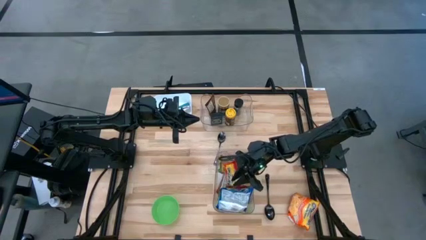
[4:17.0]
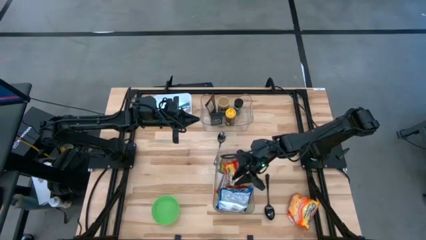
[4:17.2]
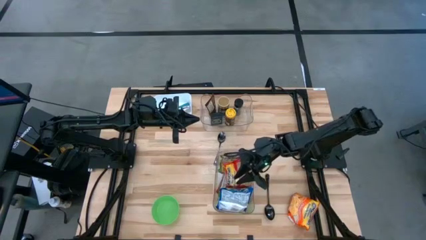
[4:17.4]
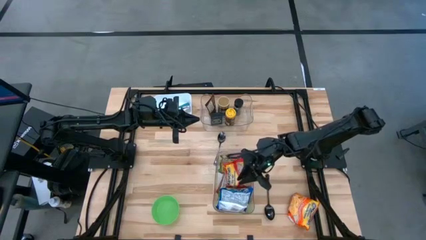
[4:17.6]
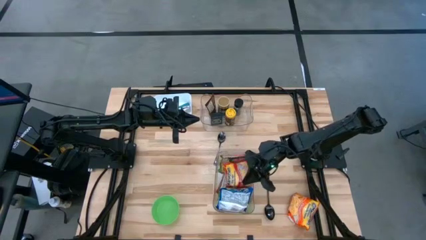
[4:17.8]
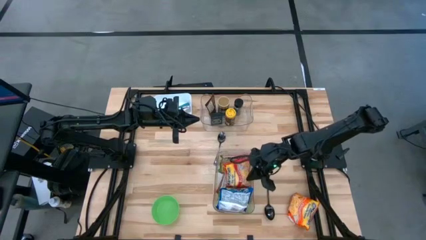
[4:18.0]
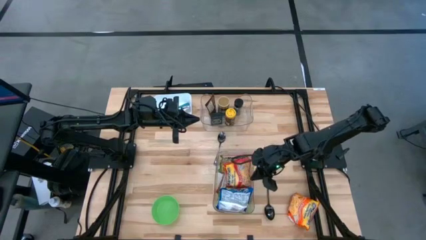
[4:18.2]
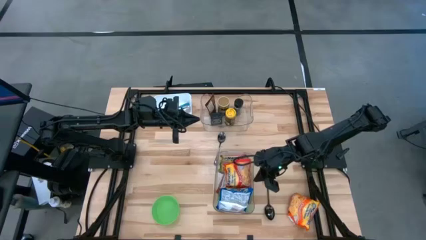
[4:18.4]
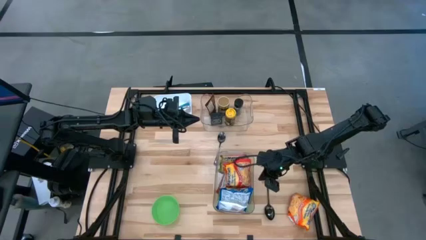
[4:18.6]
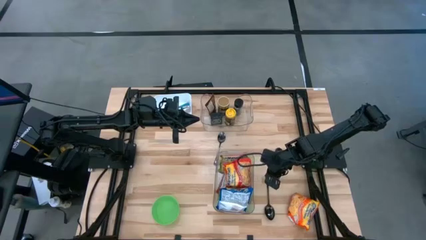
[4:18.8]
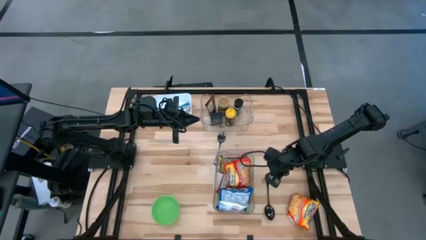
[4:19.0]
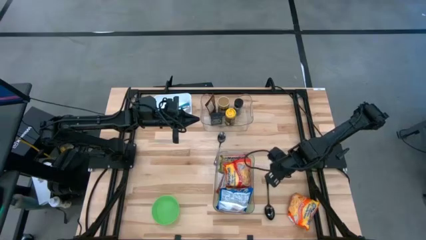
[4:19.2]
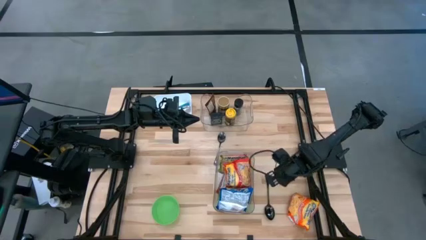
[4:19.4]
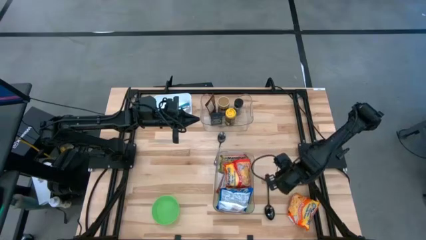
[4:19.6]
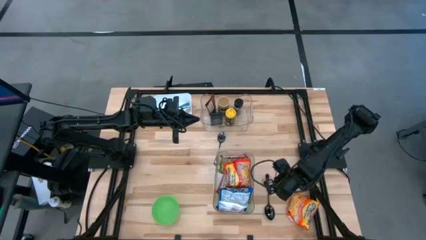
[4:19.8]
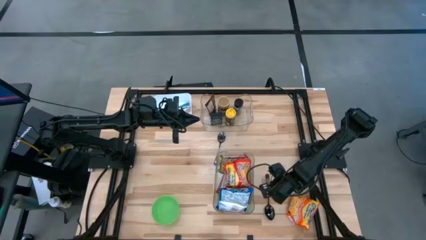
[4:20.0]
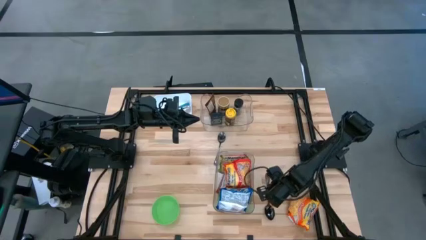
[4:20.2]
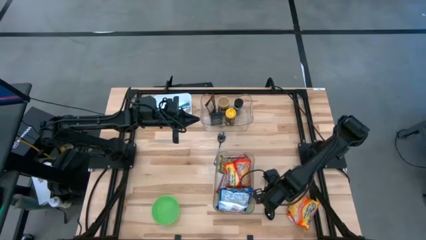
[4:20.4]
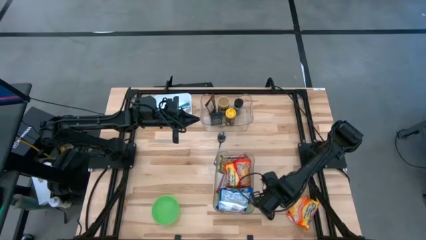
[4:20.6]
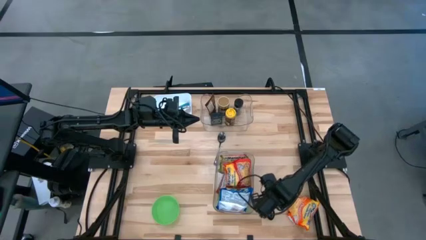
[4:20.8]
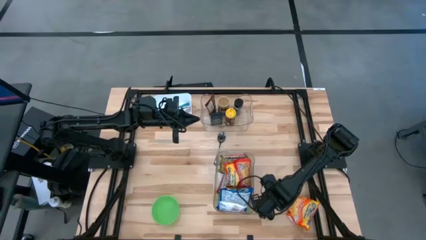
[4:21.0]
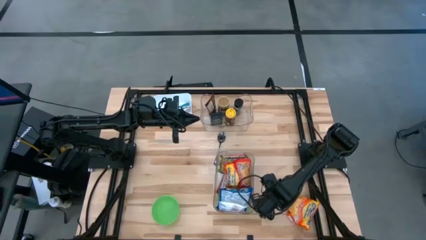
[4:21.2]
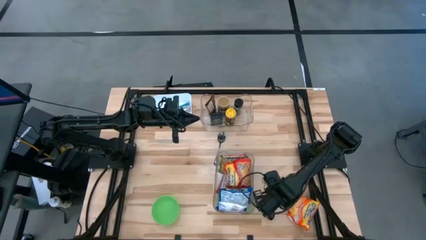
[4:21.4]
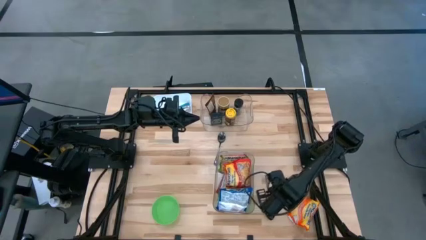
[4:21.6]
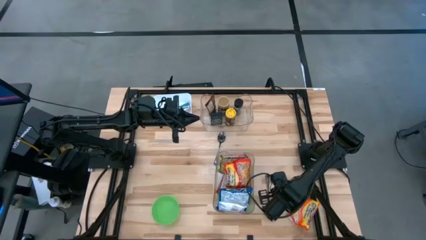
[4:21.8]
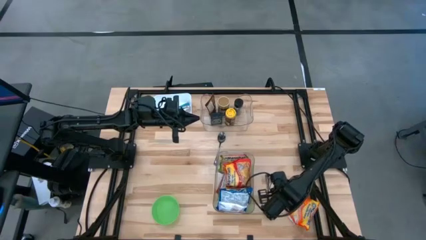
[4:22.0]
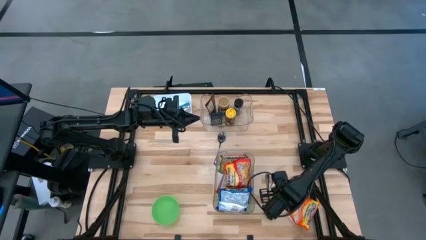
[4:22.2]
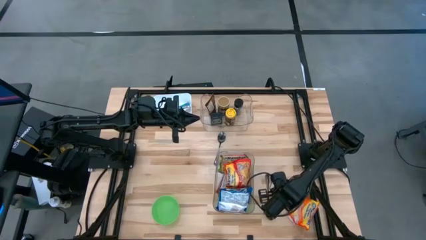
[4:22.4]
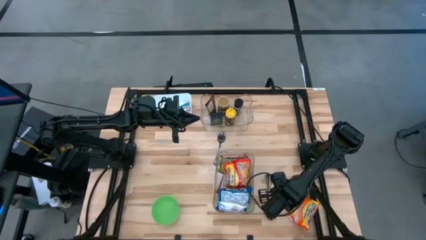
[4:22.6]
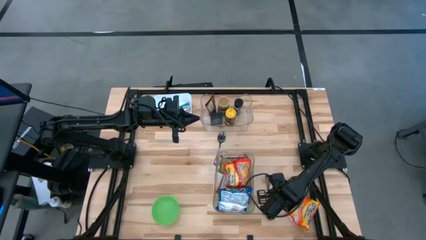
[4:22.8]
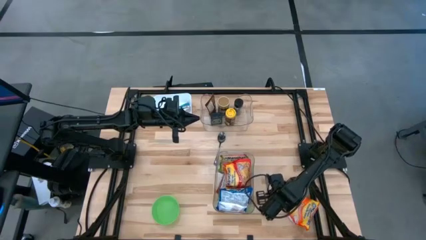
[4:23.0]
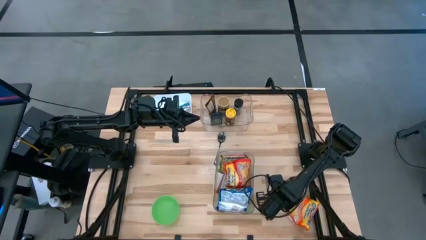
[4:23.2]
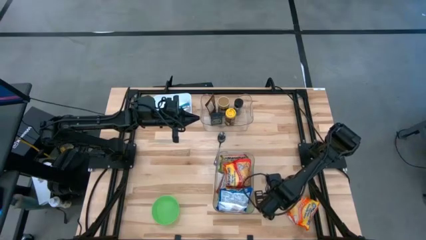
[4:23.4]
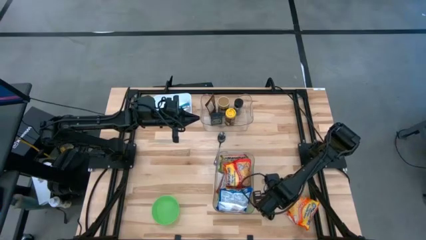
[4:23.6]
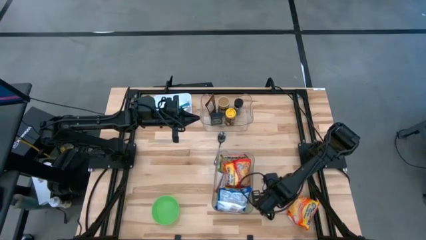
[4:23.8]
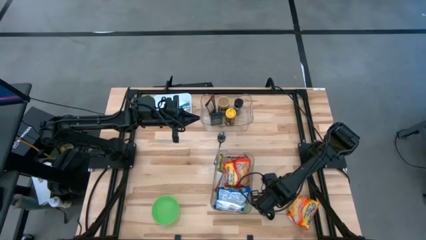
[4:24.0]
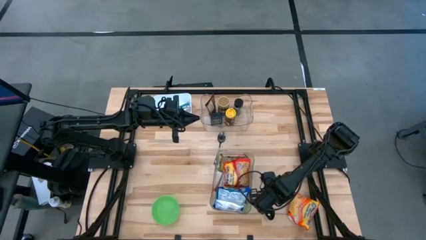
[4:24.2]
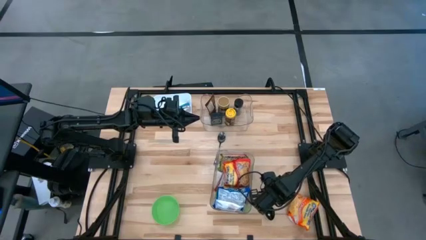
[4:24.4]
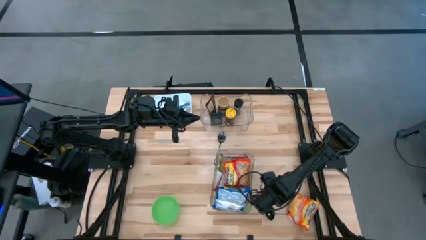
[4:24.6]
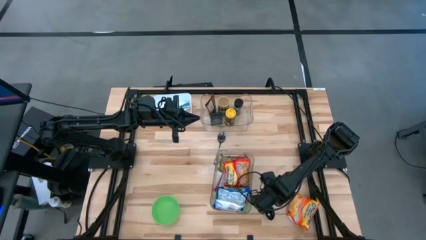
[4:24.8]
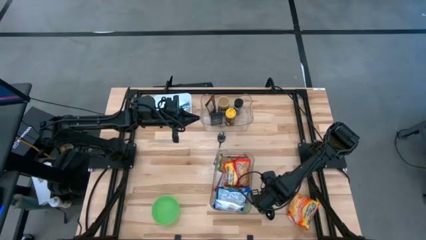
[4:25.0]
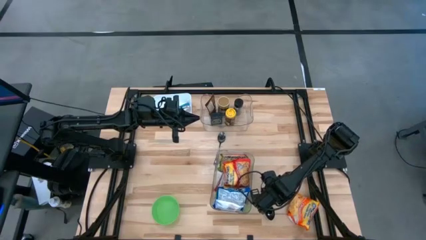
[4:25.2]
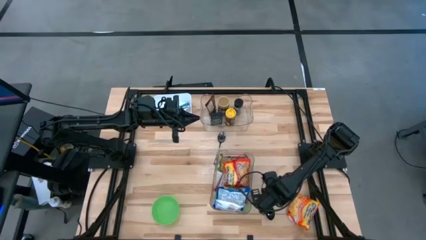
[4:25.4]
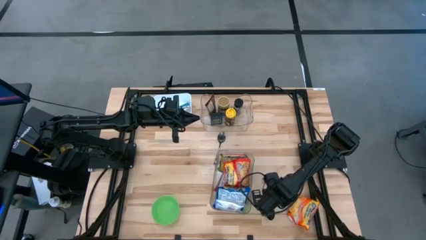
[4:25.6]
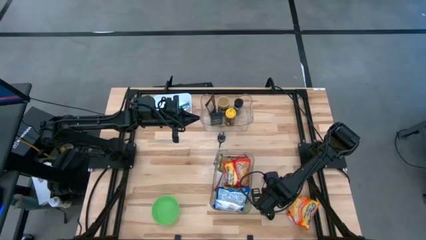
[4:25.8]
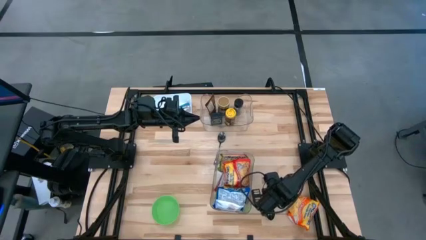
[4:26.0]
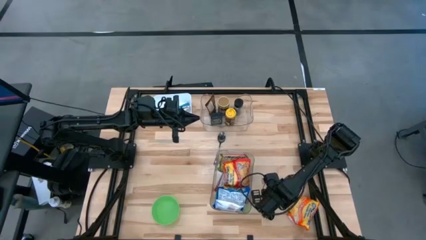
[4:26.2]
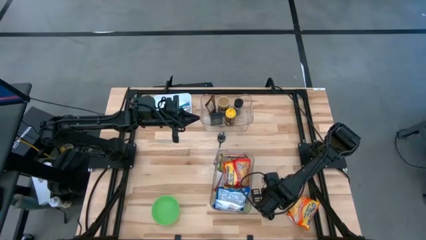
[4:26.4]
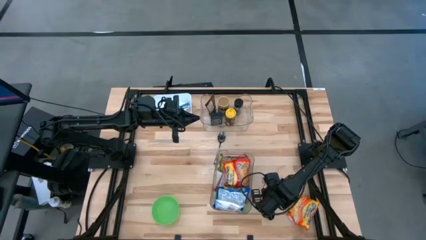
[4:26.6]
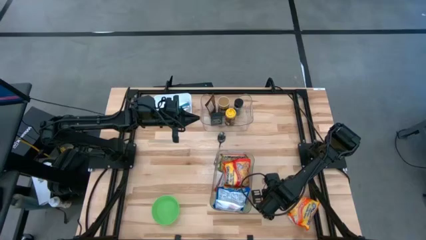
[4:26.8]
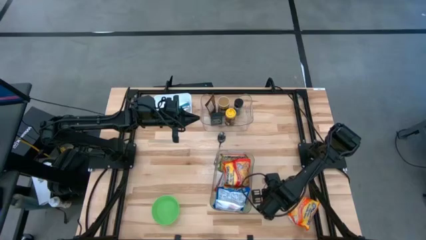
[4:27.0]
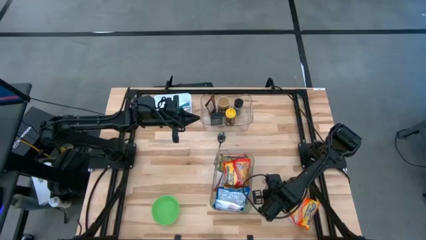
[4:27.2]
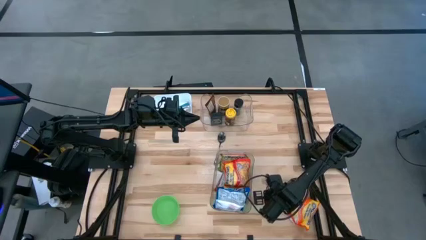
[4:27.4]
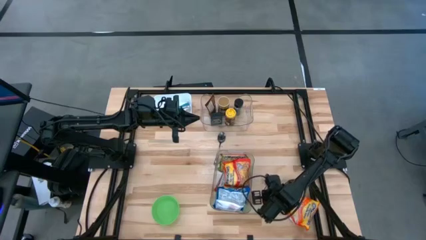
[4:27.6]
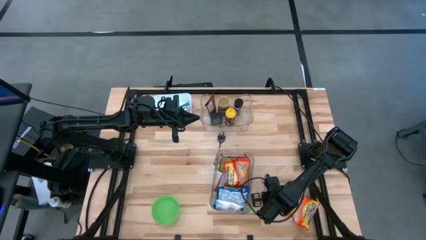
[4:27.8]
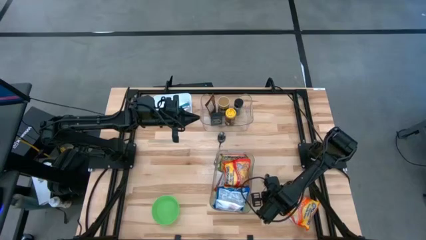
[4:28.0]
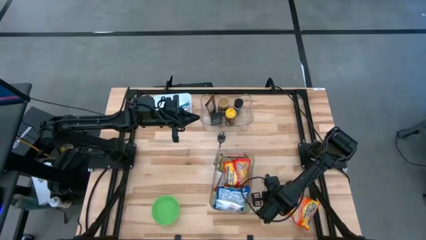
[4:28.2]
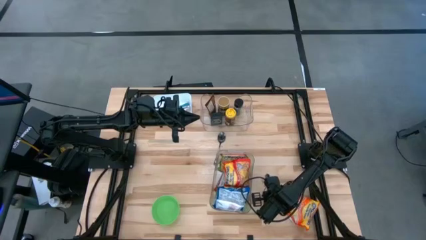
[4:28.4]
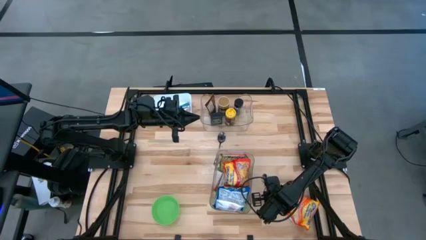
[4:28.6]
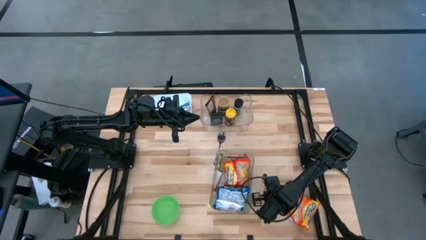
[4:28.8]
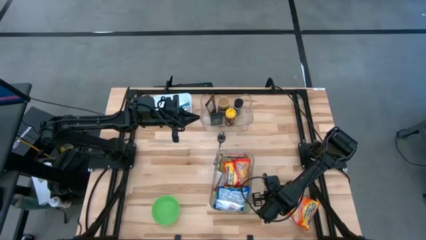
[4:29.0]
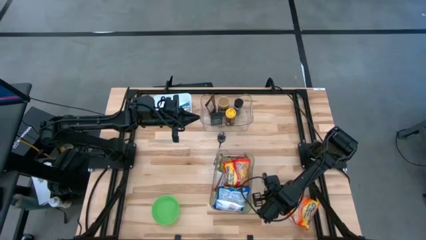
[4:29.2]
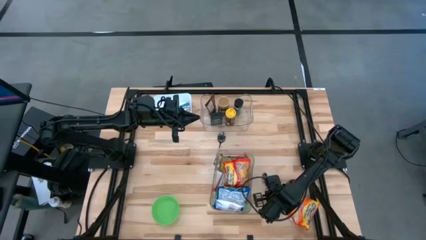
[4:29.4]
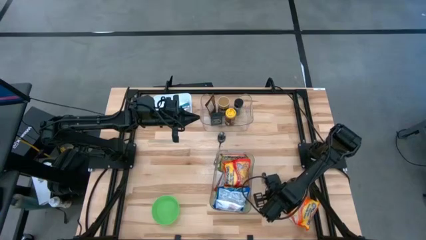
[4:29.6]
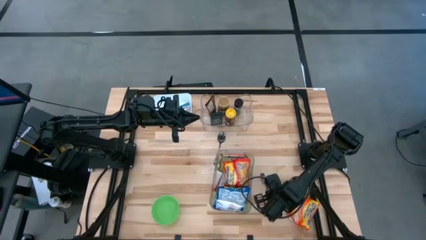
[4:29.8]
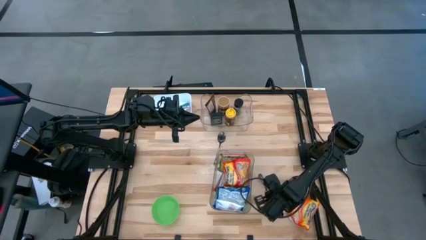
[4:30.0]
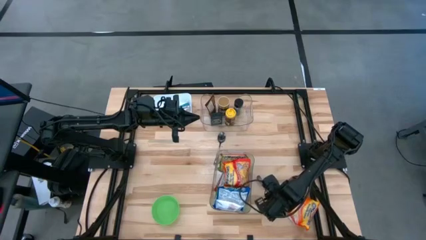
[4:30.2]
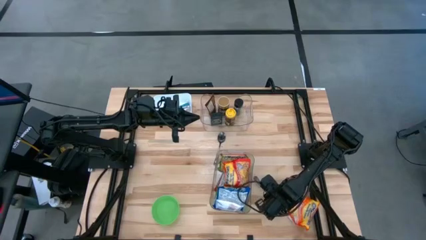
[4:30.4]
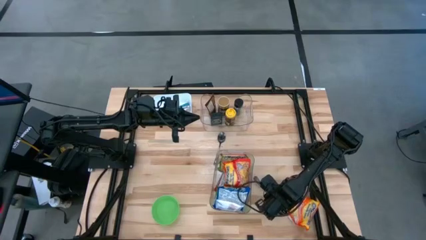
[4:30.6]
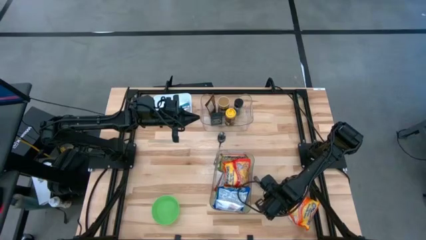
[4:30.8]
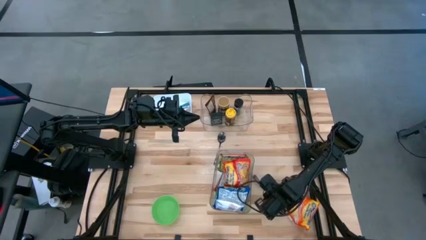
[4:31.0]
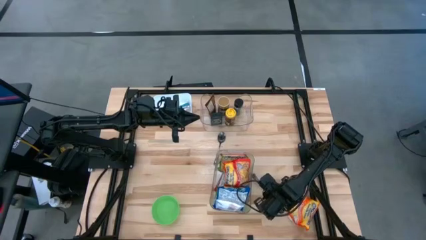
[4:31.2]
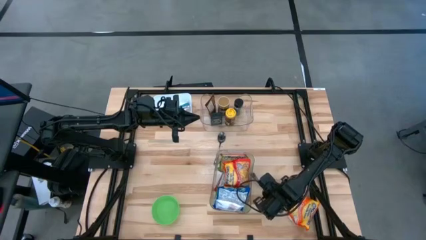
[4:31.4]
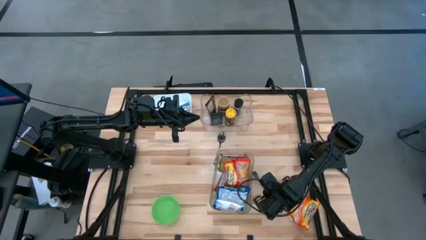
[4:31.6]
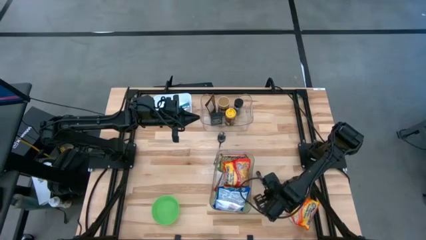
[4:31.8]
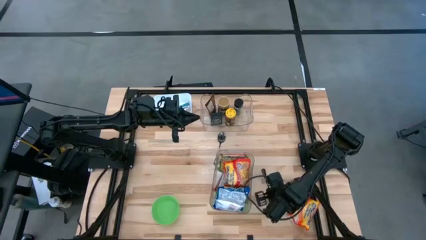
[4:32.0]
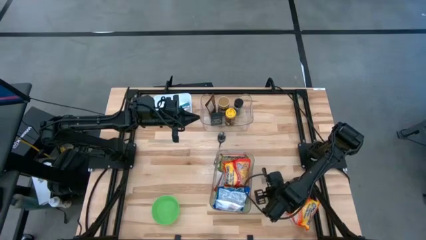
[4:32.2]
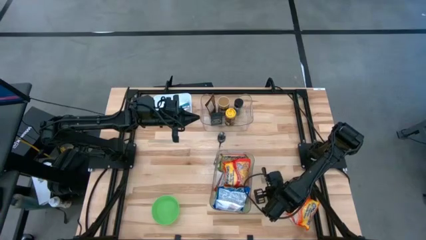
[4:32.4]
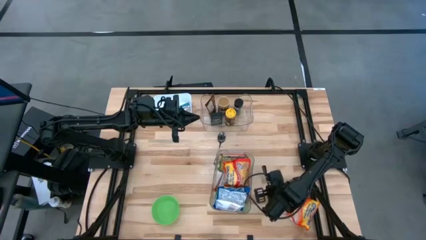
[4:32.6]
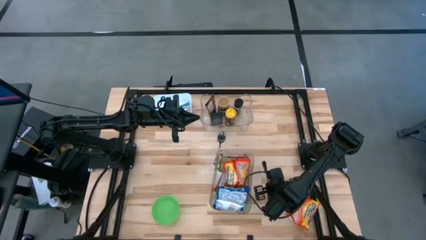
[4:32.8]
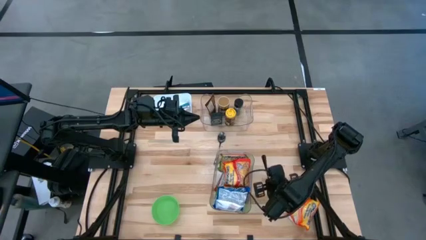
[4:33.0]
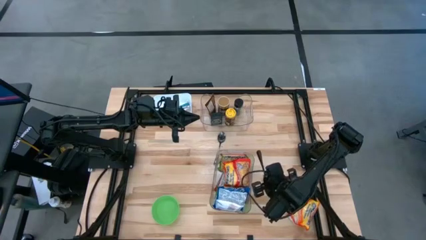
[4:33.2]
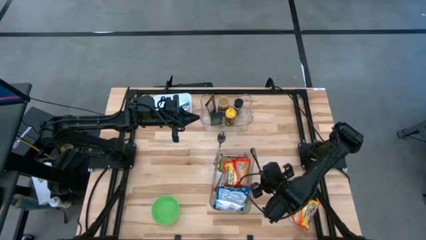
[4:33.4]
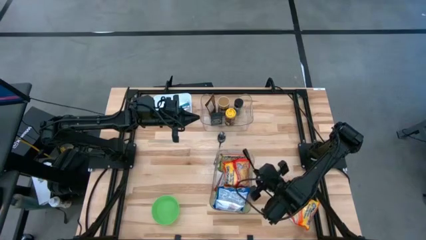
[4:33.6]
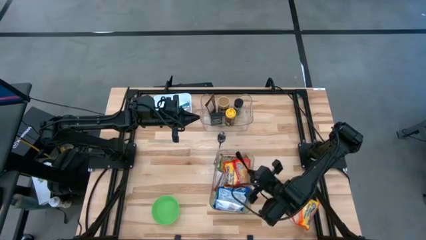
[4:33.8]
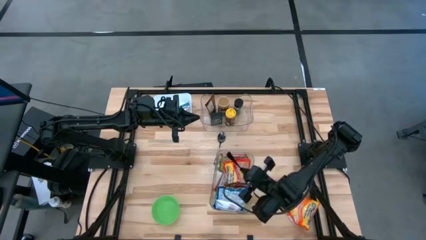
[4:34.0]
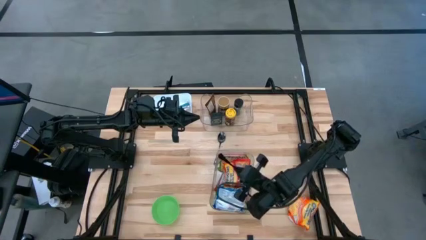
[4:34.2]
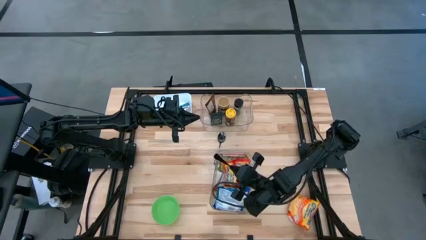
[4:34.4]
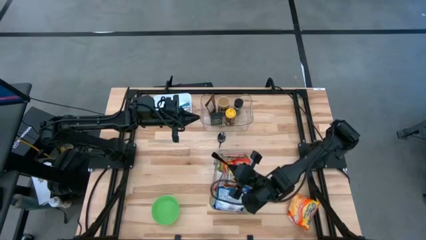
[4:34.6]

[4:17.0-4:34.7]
Task: Pick & Place Food Item
Put the bottom black spoon into the white bin
